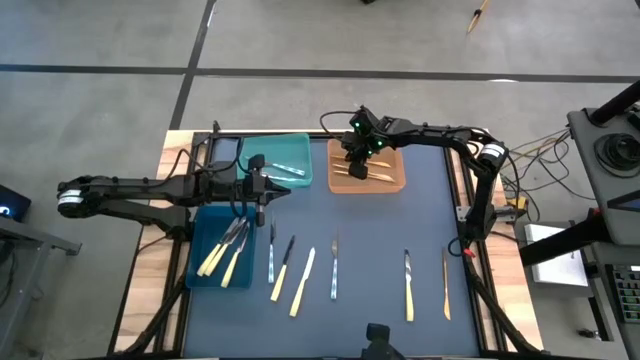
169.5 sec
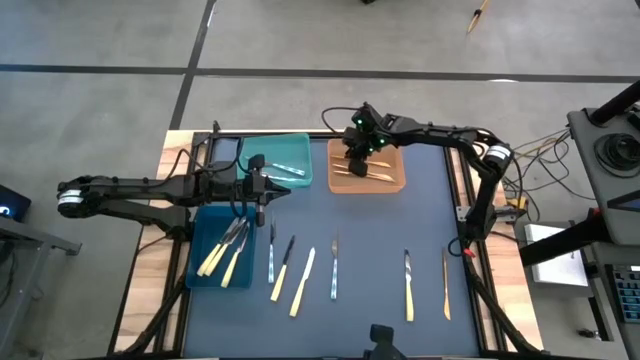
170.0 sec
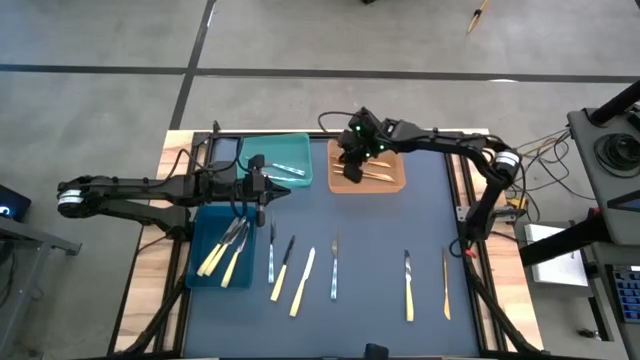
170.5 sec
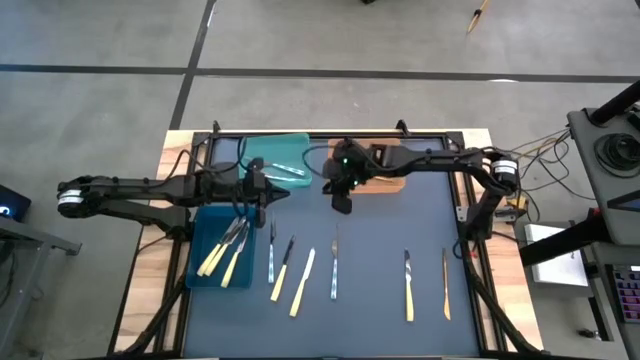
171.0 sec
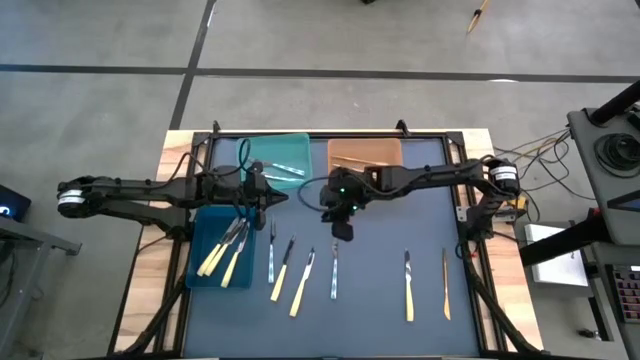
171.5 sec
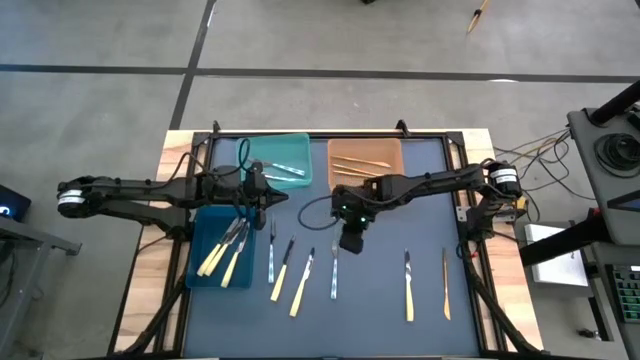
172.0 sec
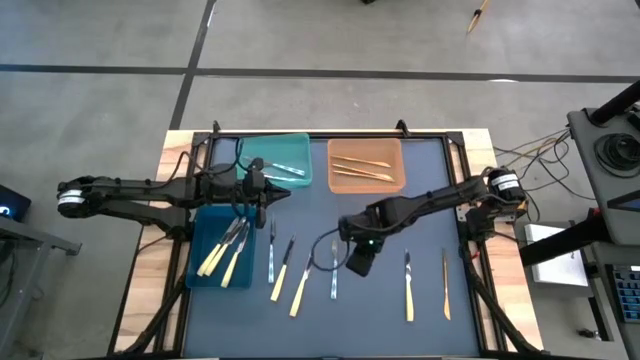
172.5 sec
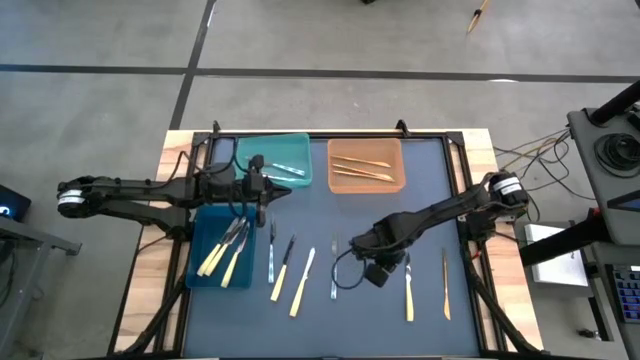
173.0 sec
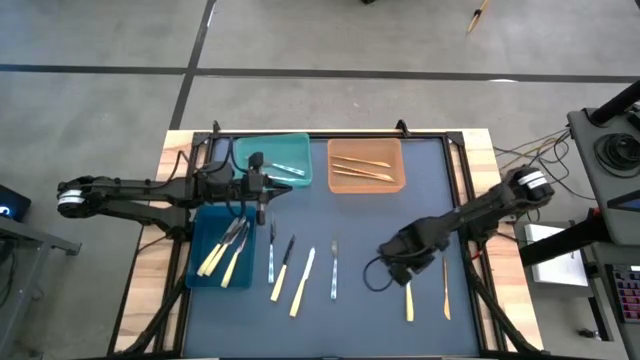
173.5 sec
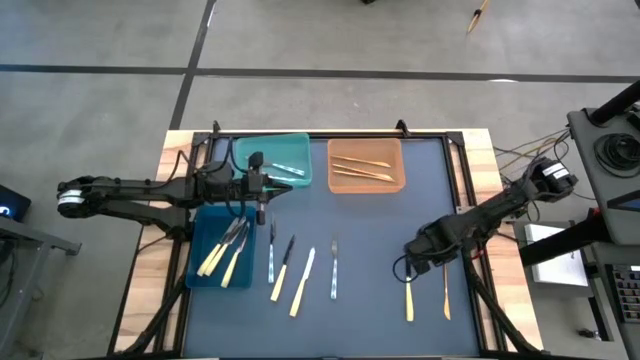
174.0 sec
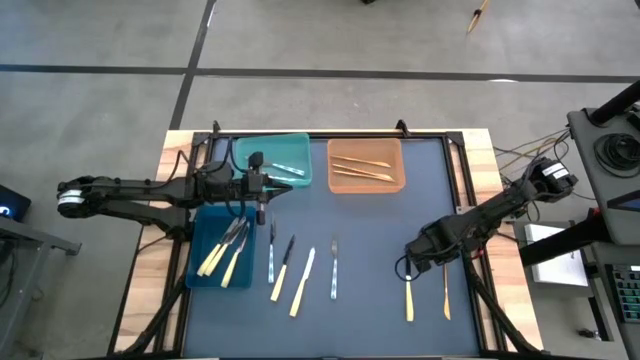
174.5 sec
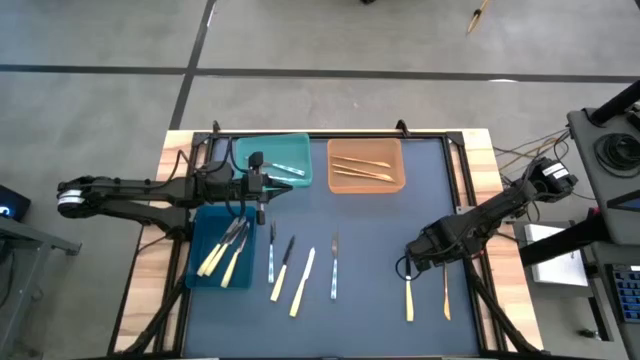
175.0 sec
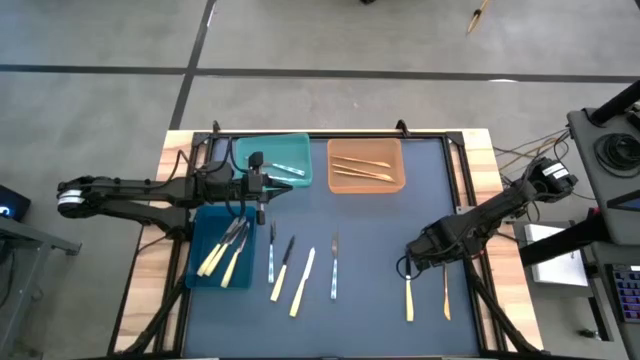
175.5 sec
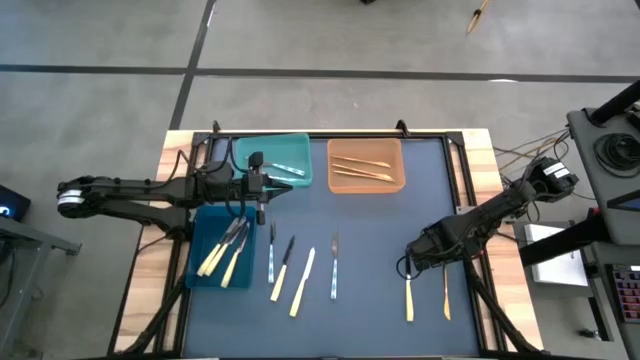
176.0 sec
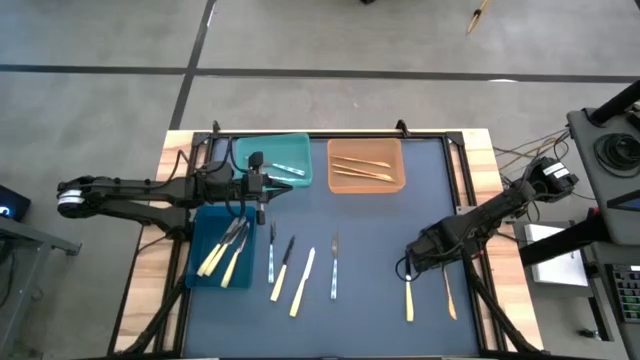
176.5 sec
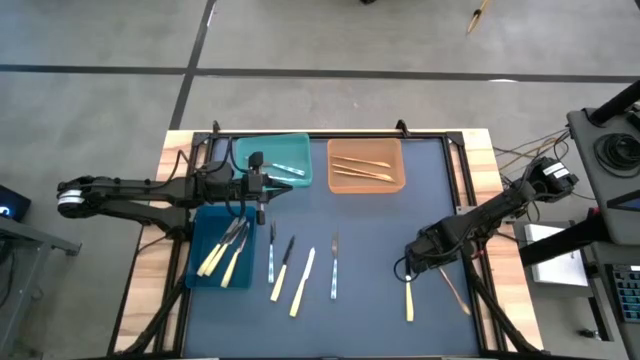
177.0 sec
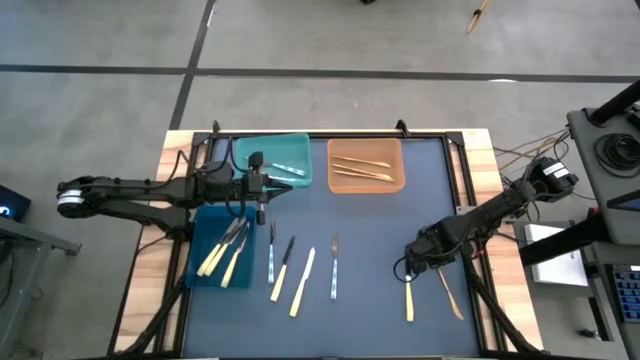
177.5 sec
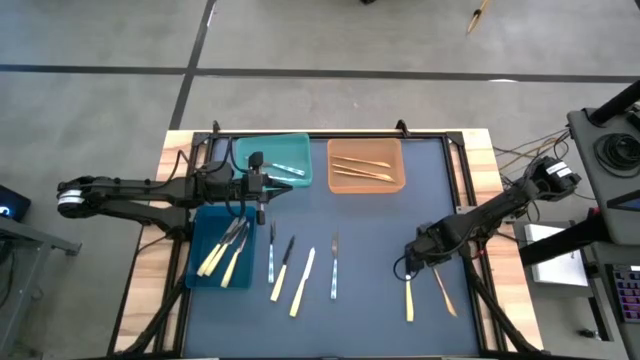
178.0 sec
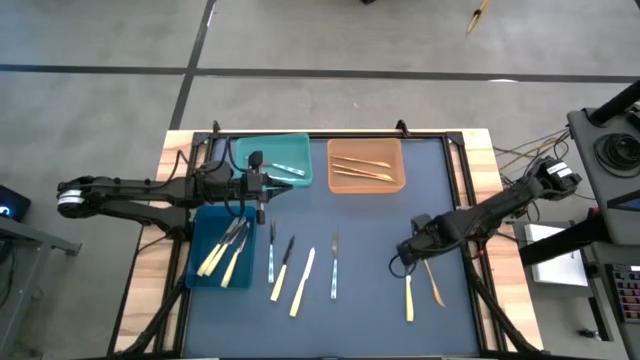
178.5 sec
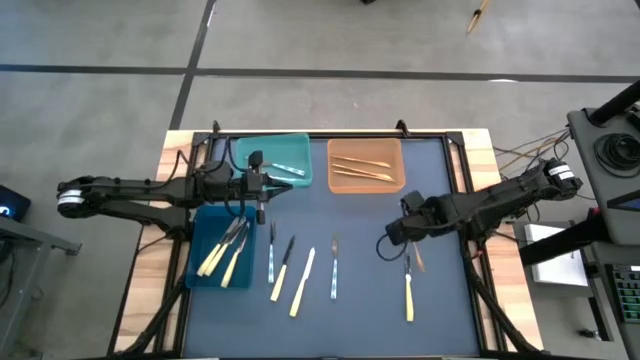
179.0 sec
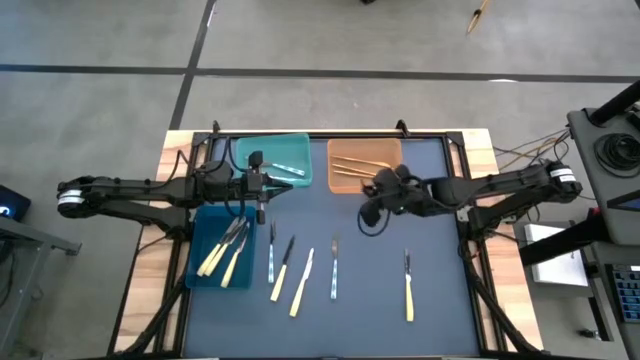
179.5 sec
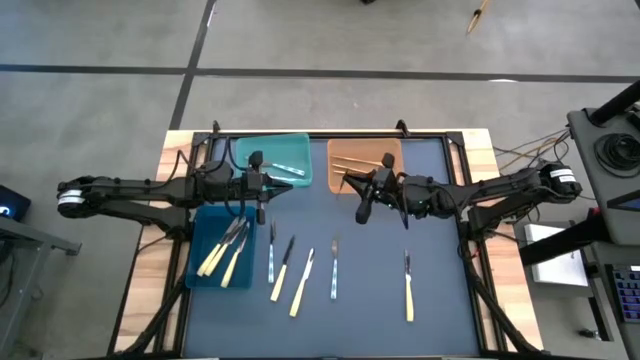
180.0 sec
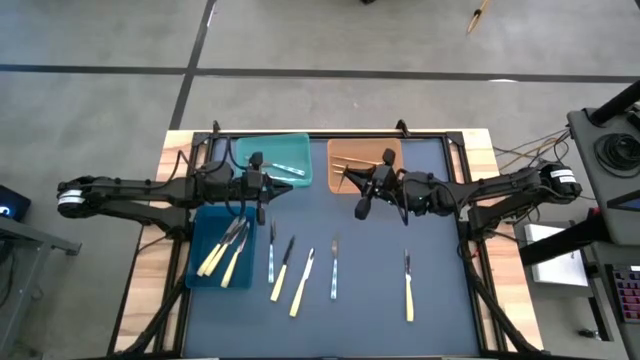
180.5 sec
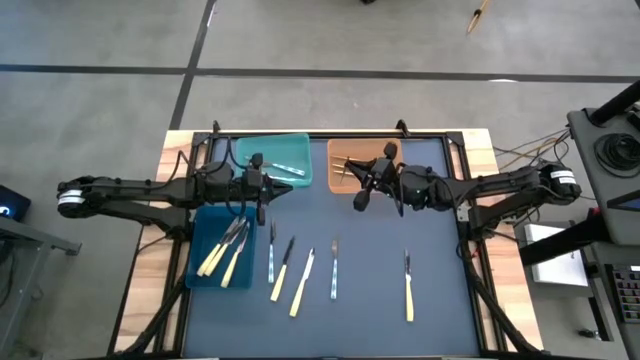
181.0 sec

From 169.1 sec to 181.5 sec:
Task: Sort silverware by color (type)
Put the golden knife into the orange bin

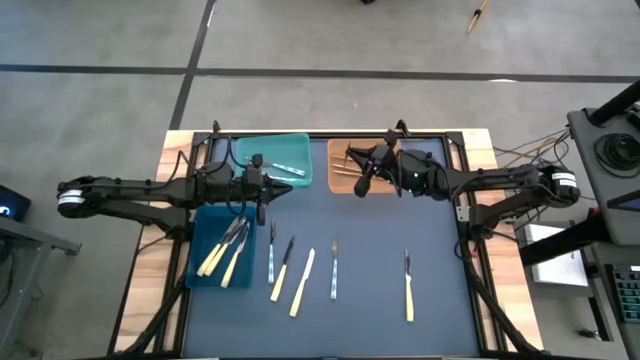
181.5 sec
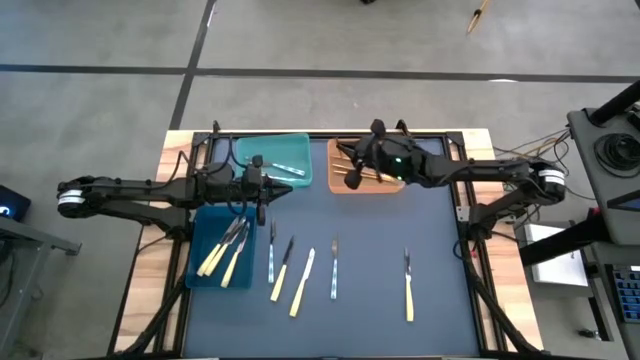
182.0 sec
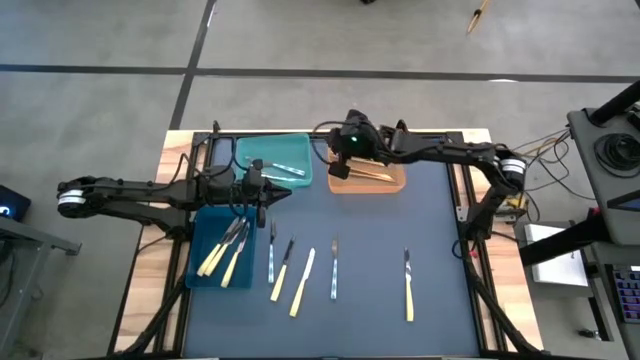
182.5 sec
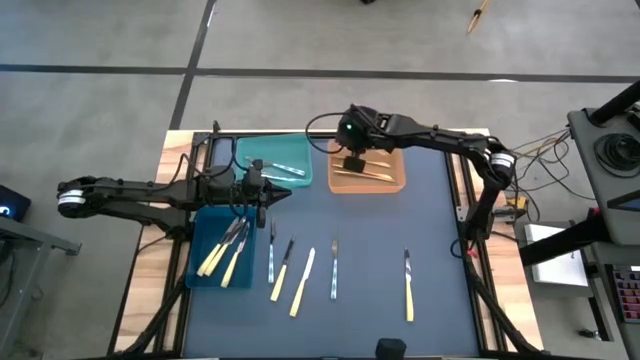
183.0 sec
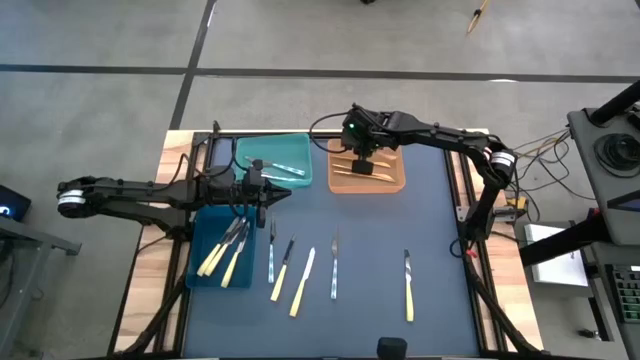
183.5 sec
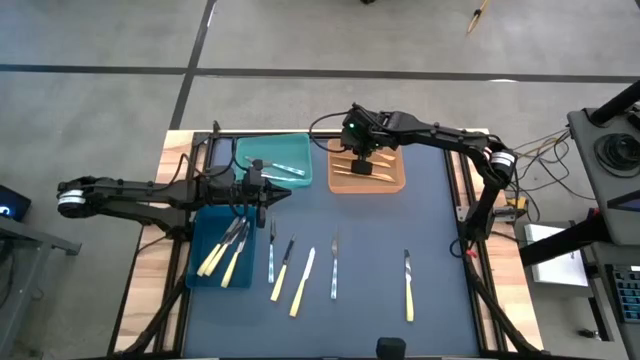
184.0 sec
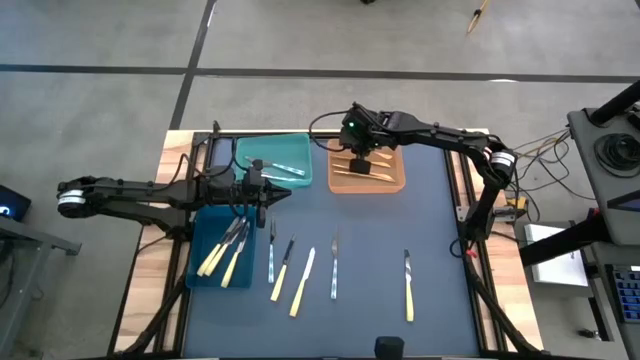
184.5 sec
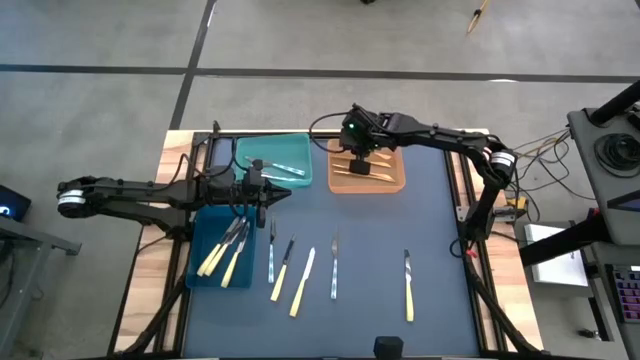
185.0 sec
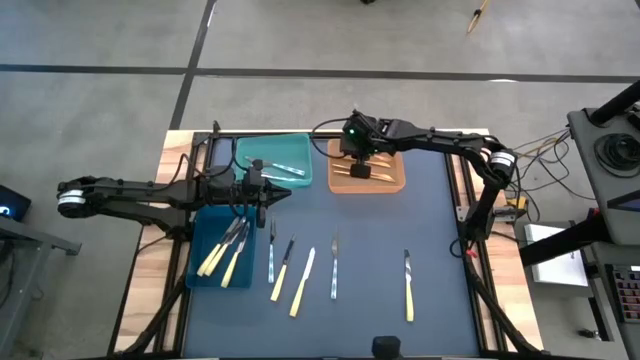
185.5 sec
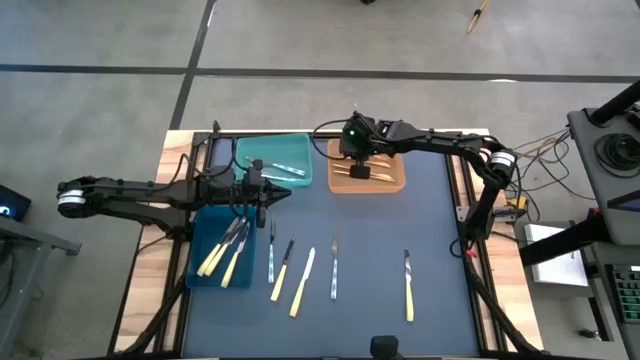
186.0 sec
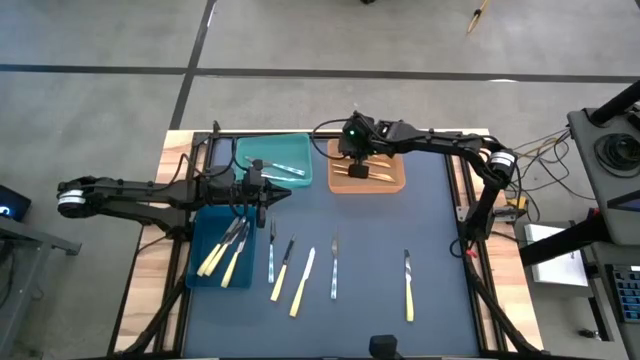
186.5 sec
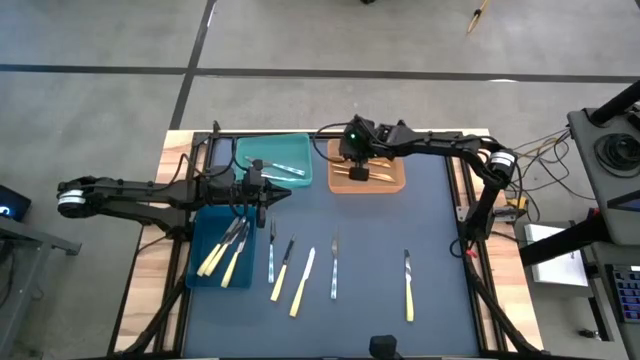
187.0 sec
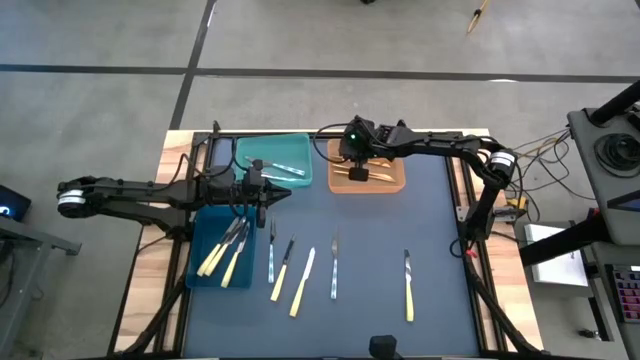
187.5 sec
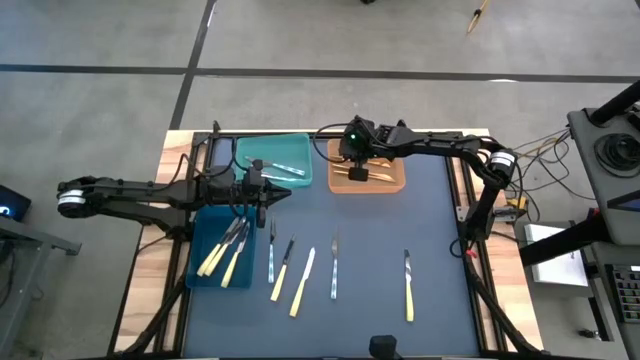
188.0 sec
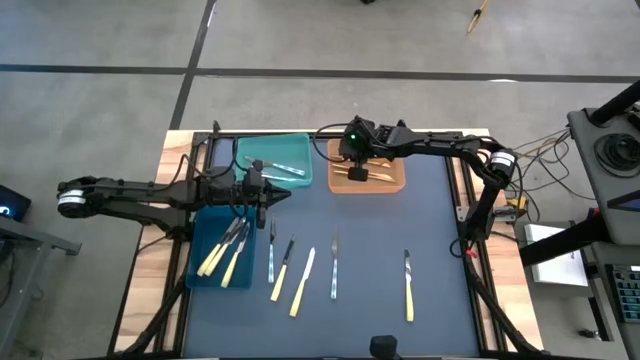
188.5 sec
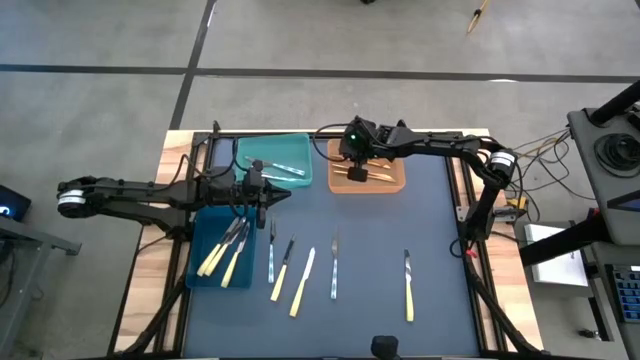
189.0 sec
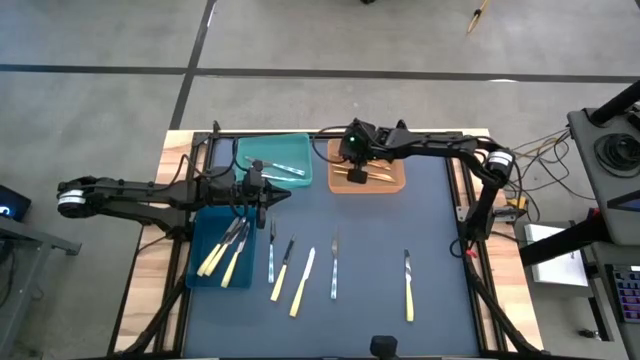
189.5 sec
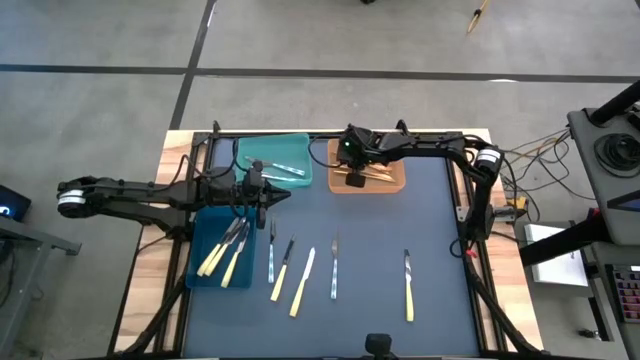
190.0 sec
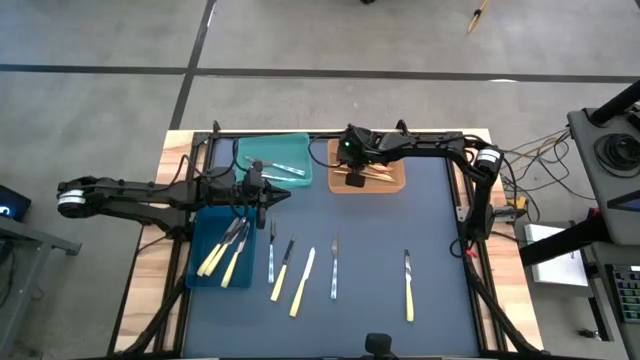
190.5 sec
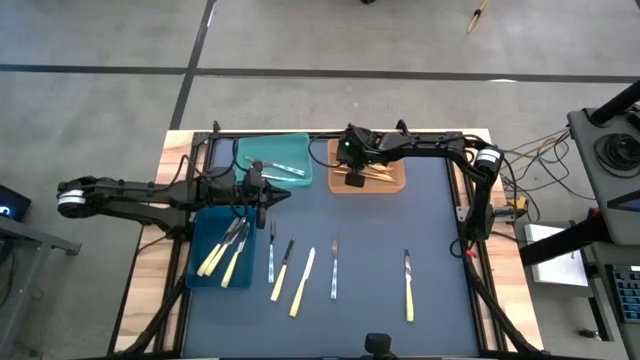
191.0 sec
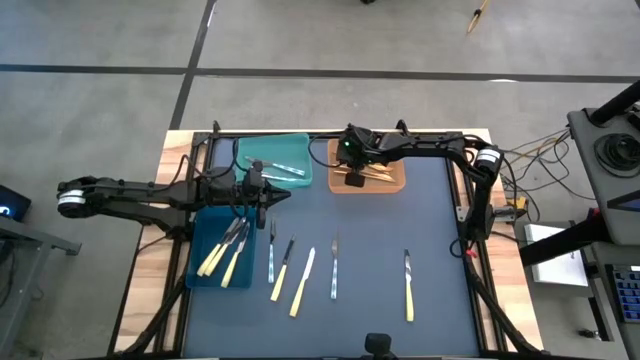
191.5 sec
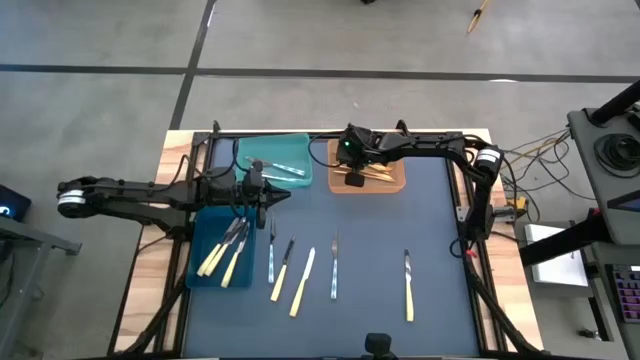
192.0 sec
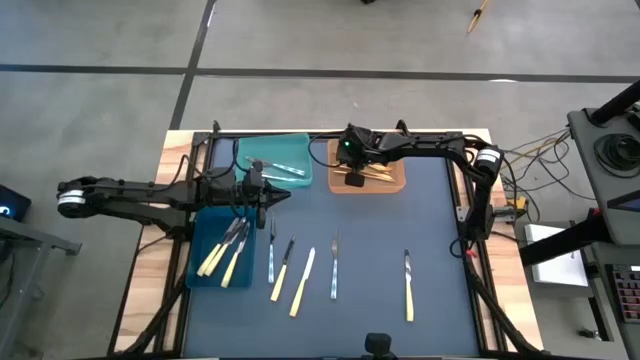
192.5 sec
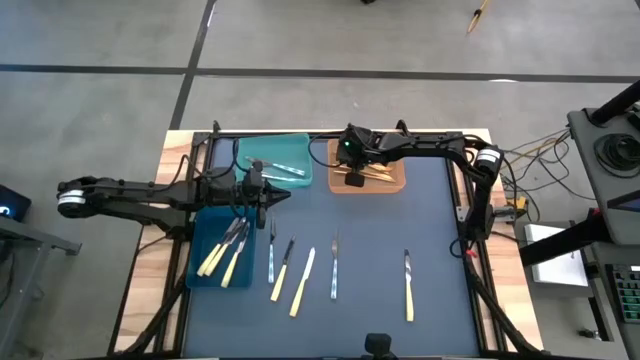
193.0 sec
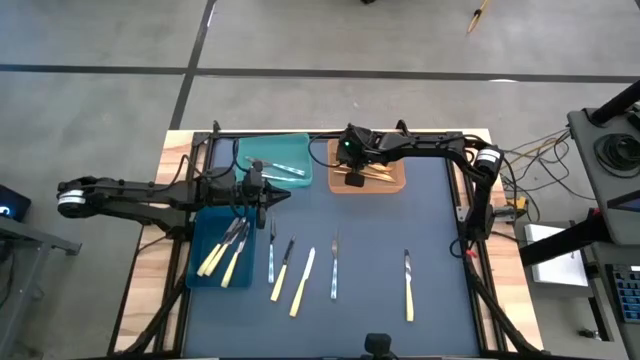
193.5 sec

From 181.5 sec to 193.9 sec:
Put the golden knife into the orange bin
